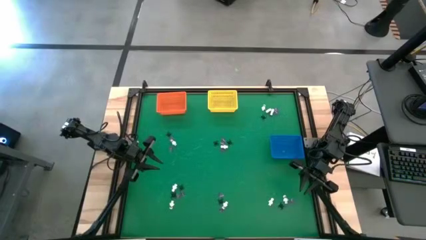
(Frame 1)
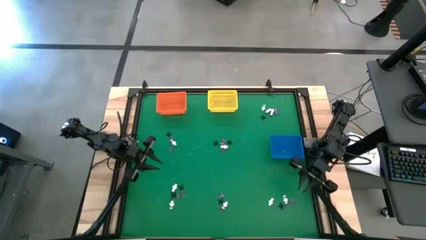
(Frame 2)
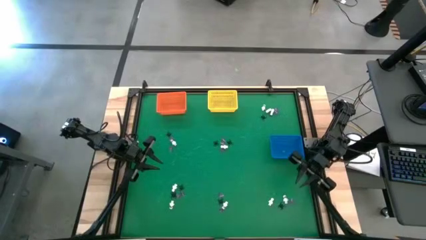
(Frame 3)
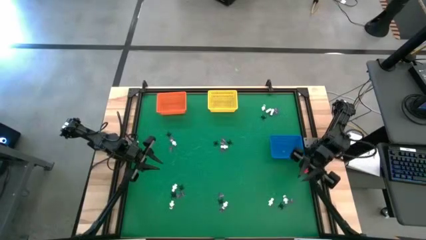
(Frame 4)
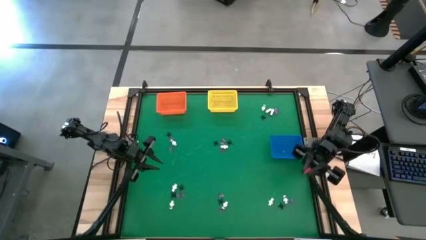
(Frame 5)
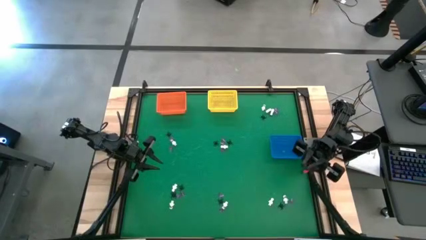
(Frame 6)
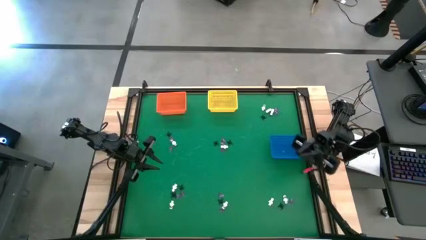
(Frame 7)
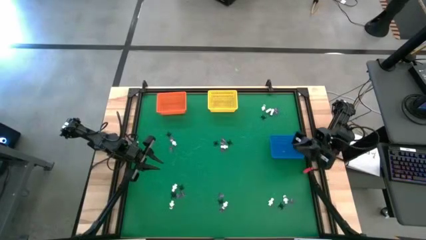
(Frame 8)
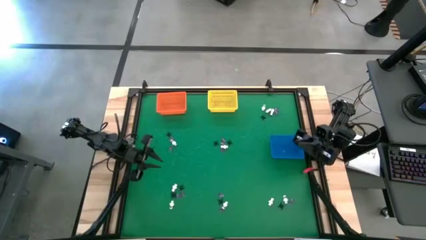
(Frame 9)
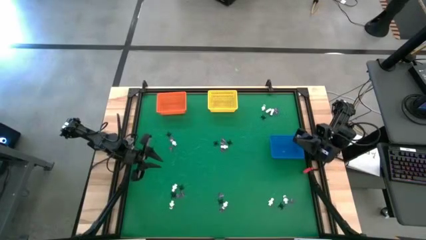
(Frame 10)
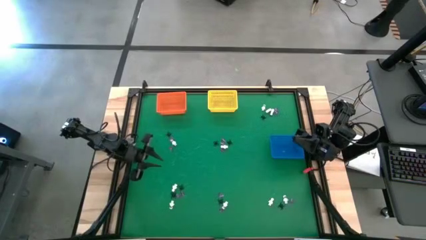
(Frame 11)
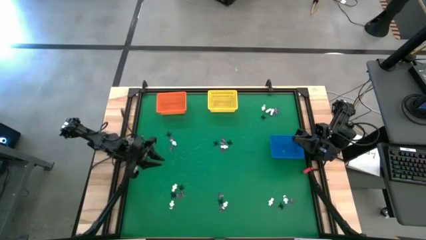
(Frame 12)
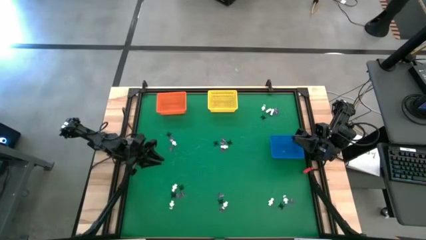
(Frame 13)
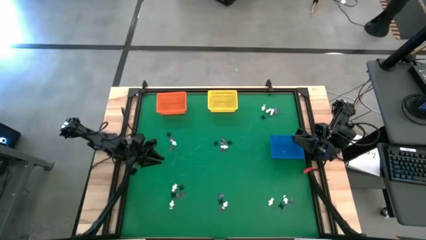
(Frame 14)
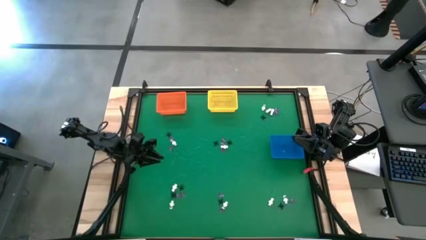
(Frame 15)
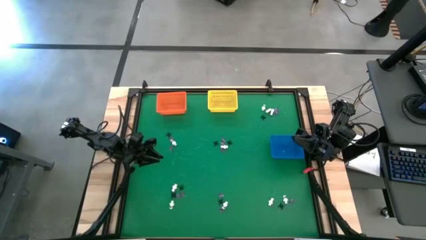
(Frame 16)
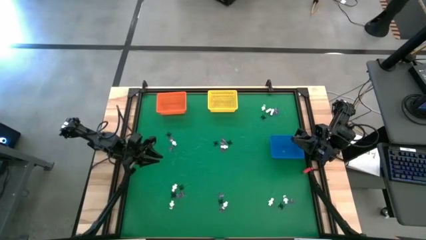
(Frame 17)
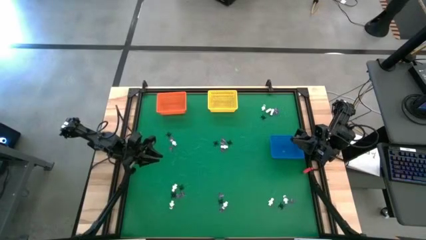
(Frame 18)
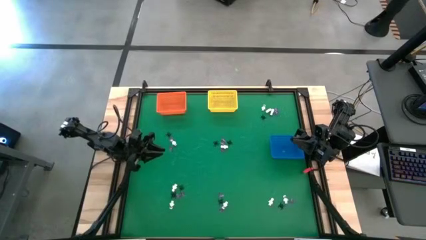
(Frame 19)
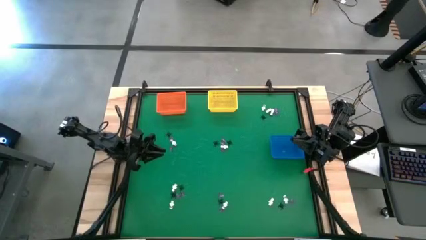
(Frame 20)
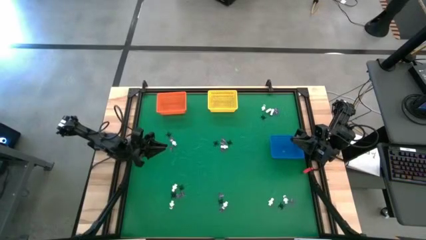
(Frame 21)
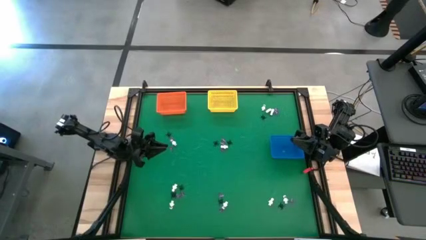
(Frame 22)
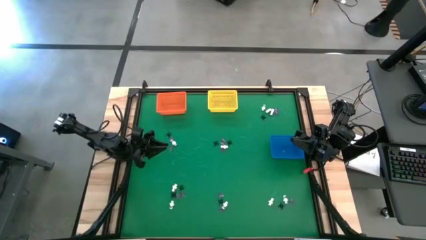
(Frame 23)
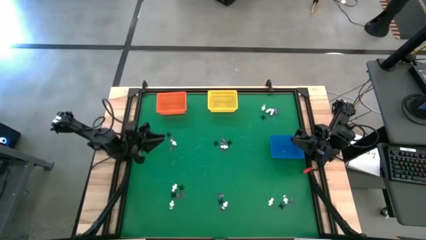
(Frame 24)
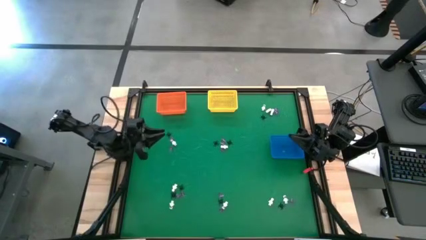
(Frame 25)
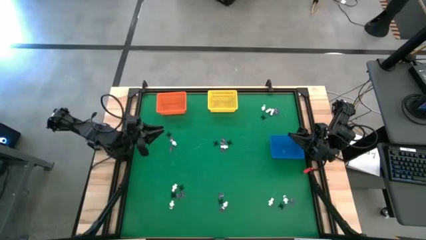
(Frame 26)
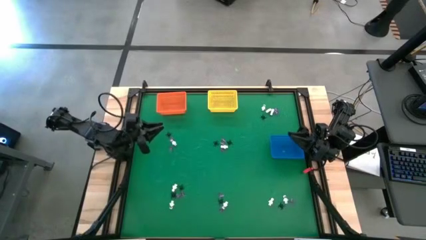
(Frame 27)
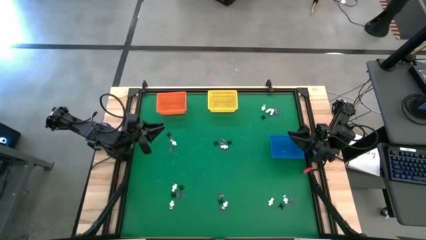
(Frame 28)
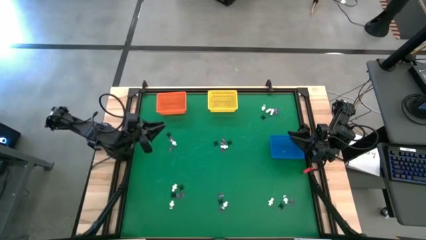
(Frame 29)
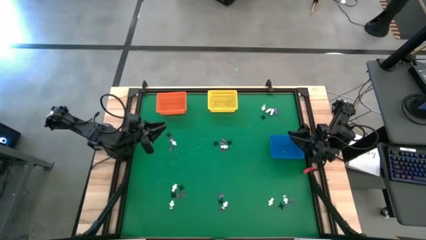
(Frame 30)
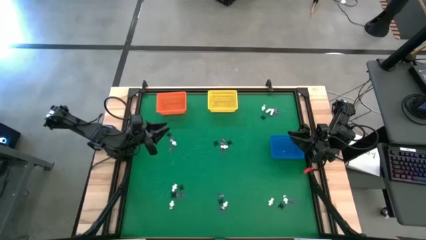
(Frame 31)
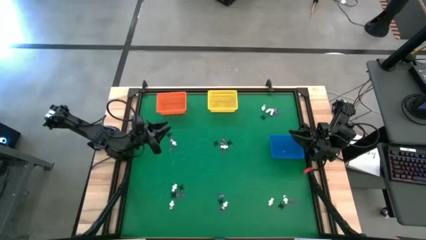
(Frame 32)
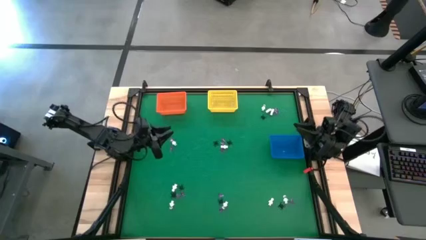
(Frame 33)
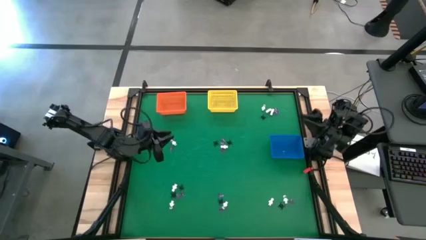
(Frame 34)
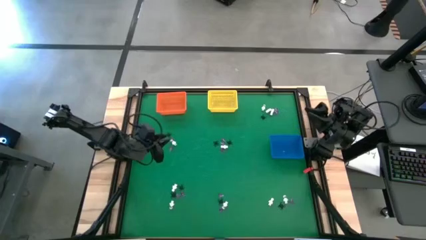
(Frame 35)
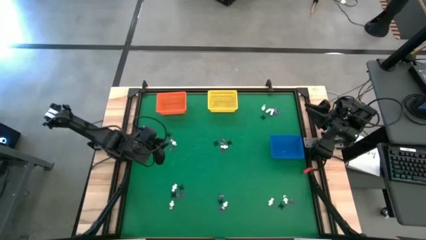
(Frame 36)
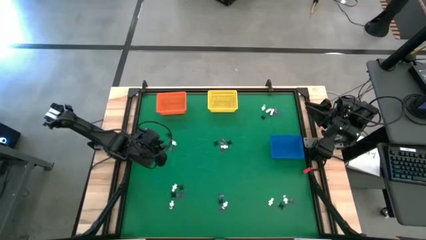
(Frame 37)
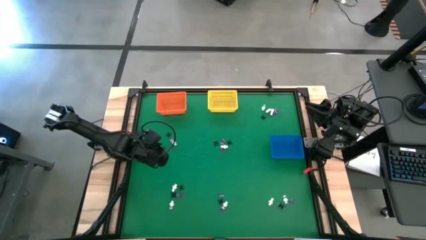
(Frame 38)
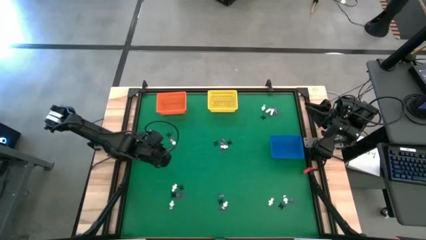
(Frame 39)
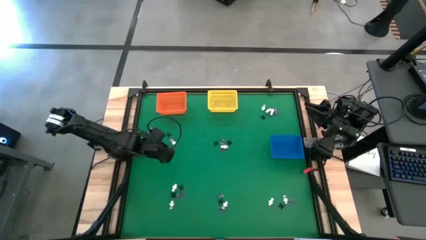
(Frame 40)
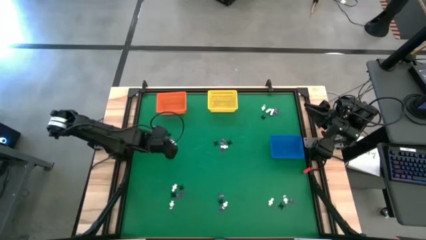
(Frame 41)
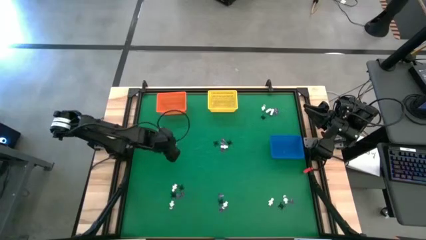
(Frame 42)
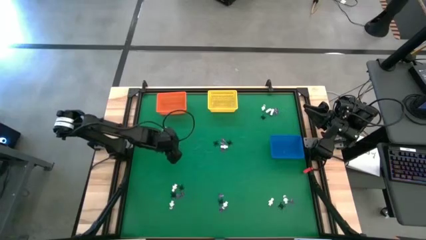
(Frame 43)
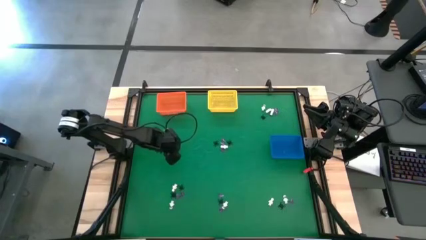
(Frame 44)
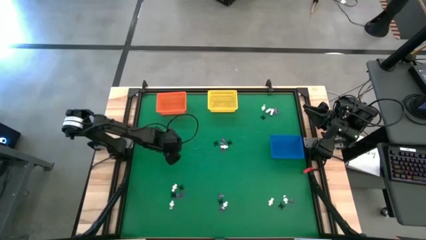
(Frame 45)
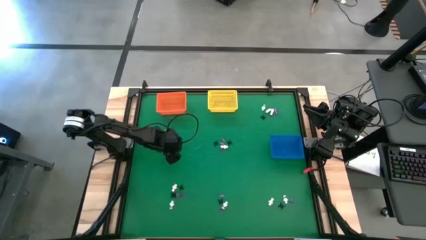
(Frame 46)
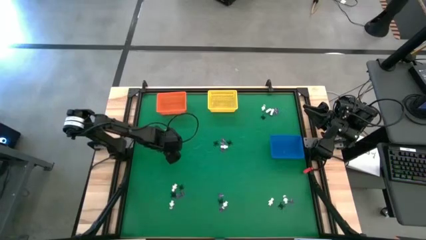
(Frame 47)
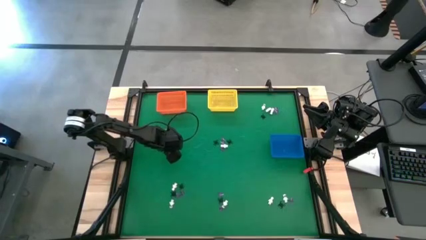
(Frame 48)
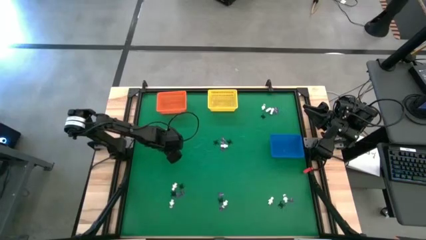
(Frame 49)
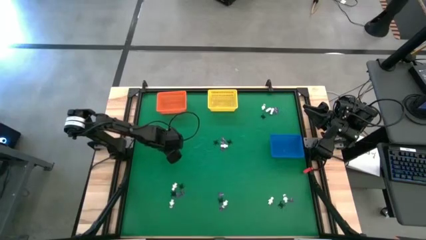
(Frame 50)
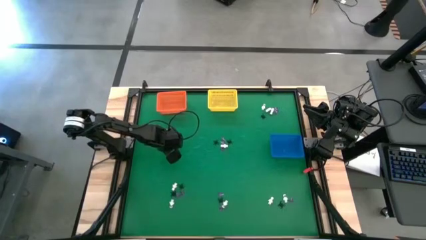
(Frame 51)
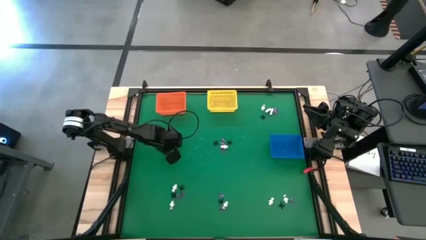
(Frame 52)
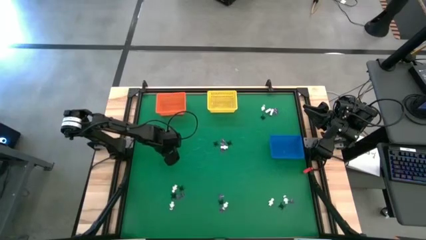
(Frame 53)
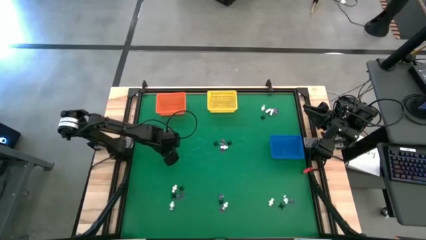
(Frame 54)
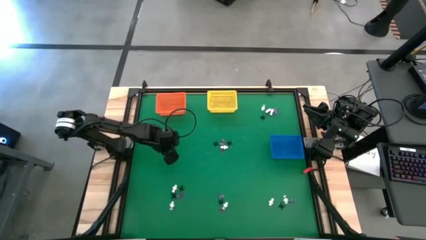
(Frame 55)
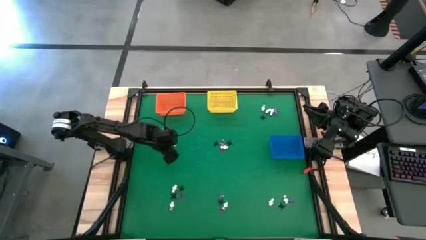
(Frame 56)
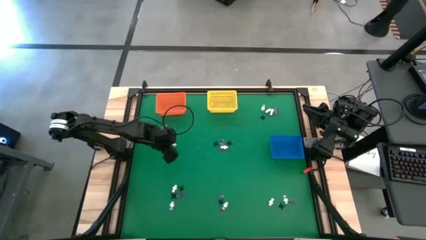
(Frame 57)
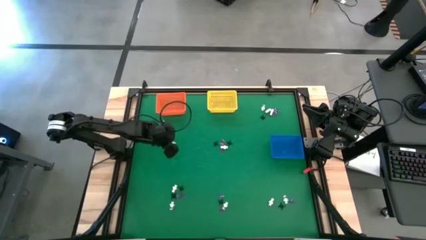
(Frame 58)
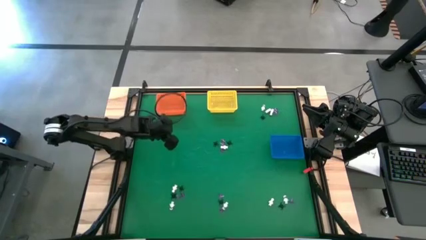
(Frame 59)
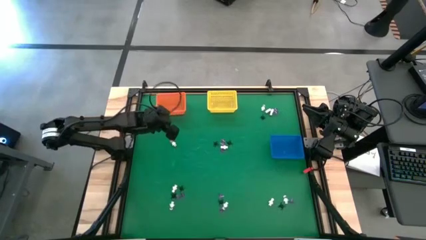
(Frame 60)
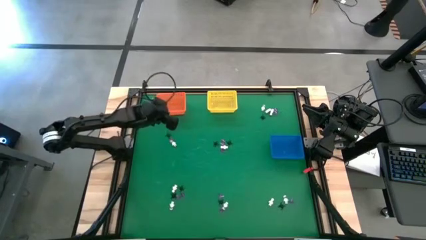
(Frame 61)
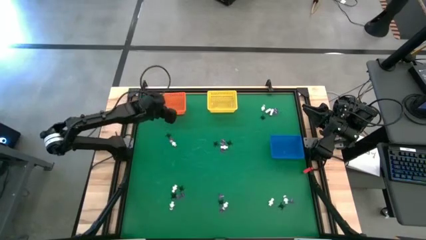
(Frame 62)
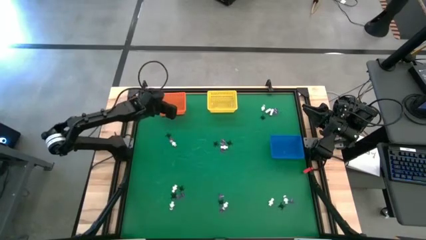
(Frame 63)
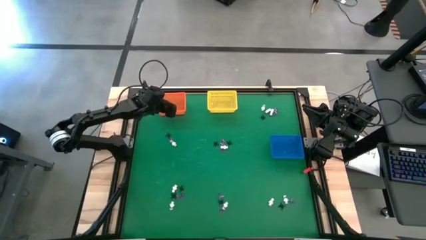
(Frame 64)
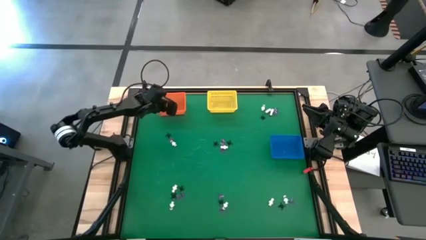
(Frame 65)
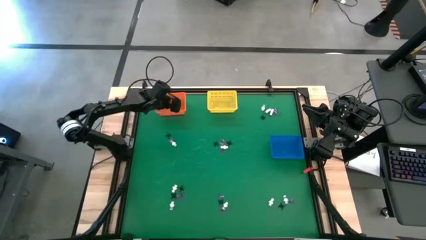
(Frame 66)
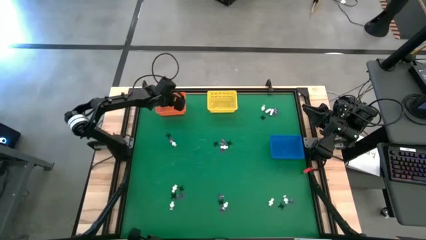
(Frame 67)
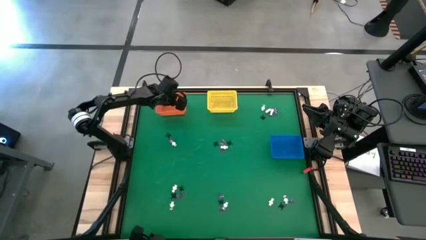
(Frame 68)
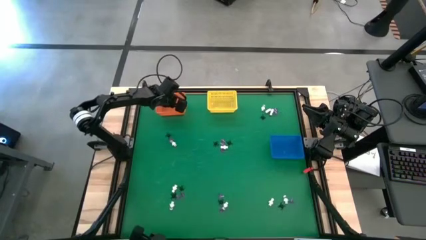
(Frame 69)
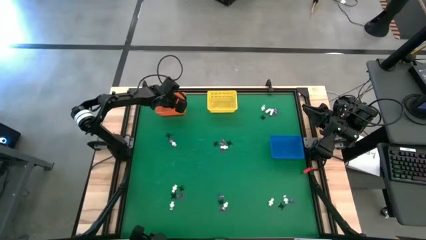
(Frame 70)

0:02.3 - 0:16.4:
Task: Sort Halloween decoration
Put the top violet hat toy into the orange basket
